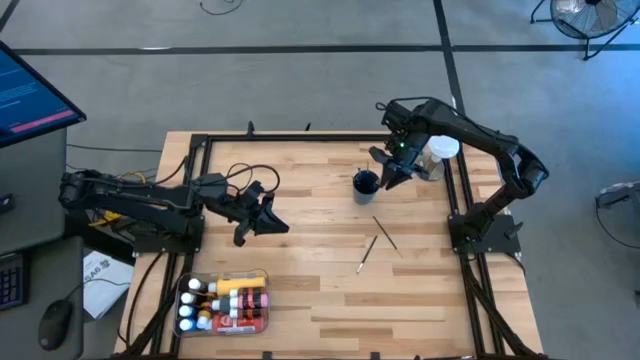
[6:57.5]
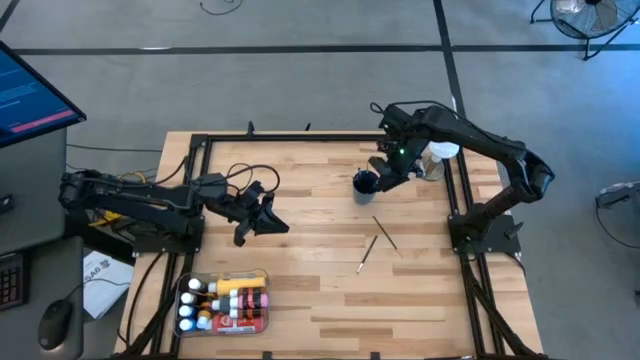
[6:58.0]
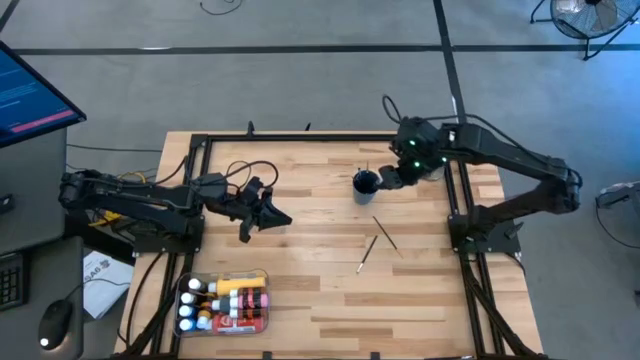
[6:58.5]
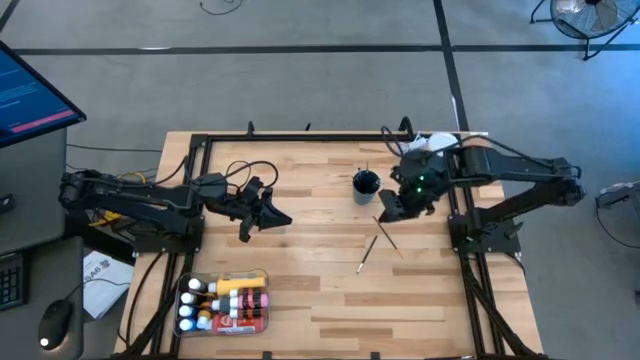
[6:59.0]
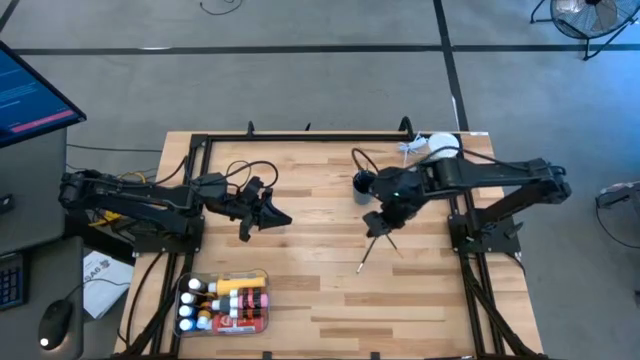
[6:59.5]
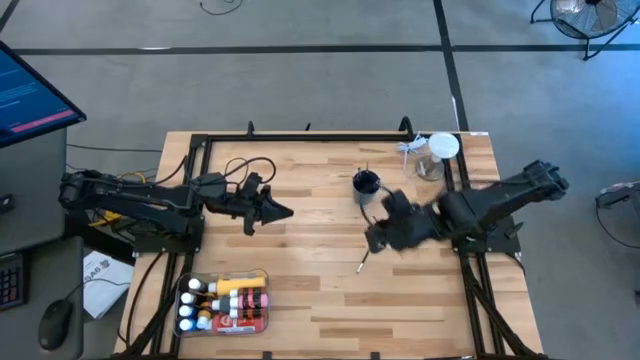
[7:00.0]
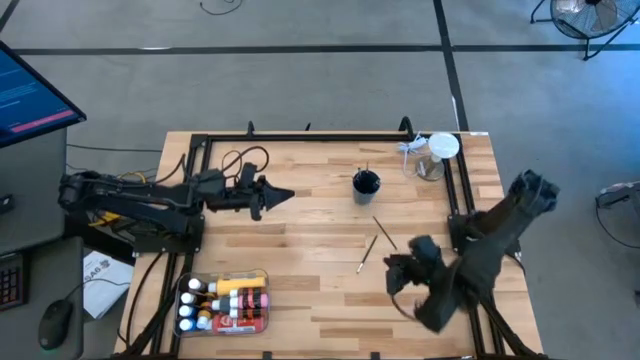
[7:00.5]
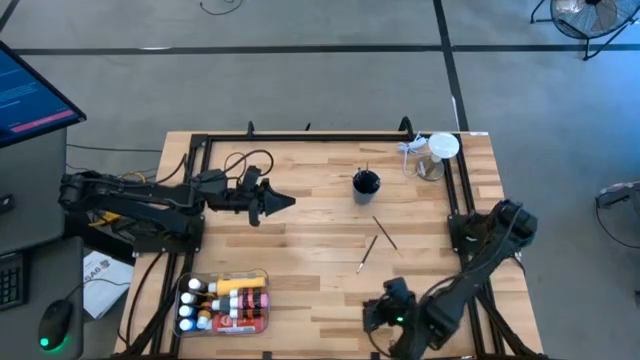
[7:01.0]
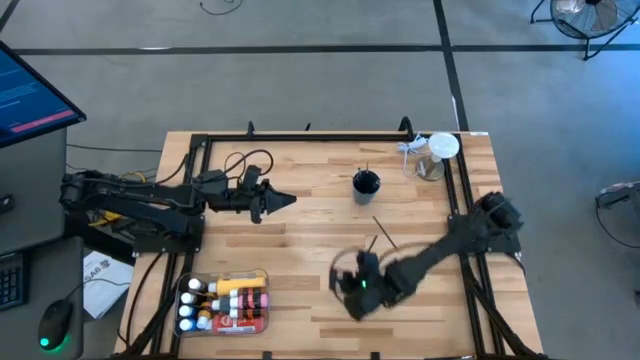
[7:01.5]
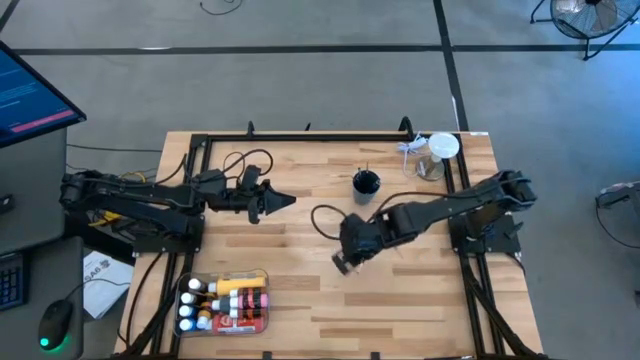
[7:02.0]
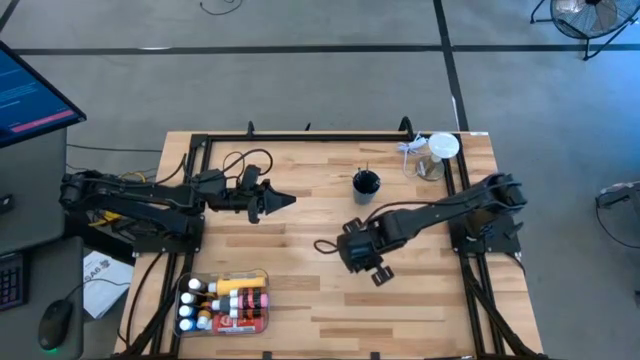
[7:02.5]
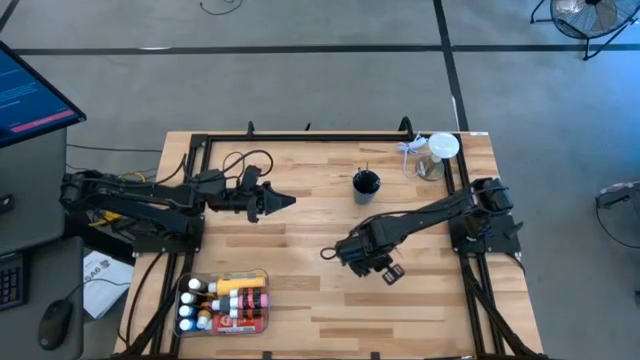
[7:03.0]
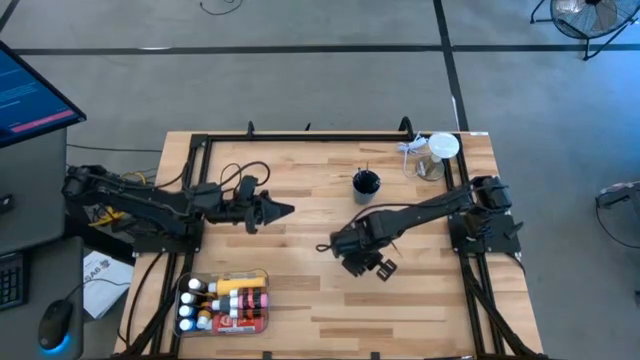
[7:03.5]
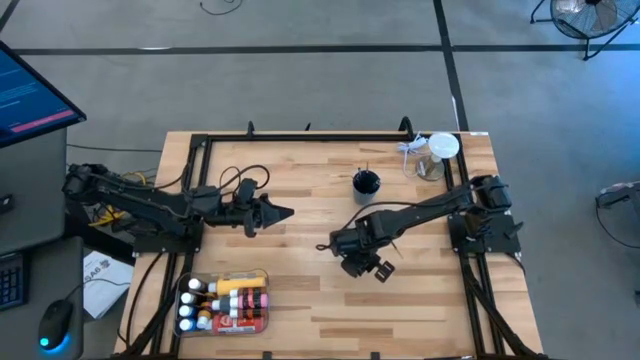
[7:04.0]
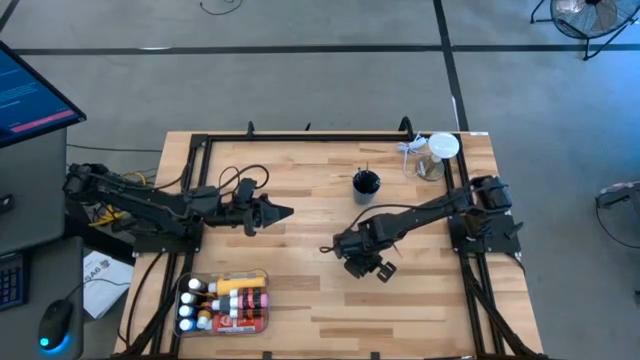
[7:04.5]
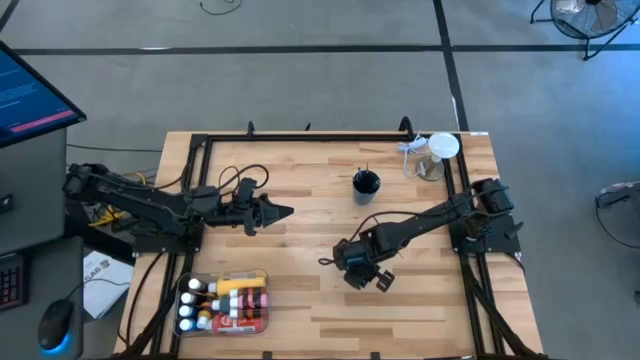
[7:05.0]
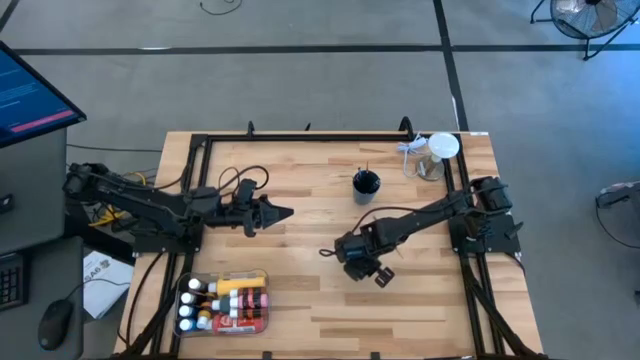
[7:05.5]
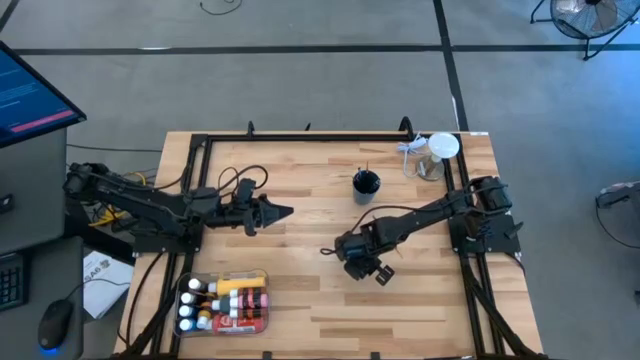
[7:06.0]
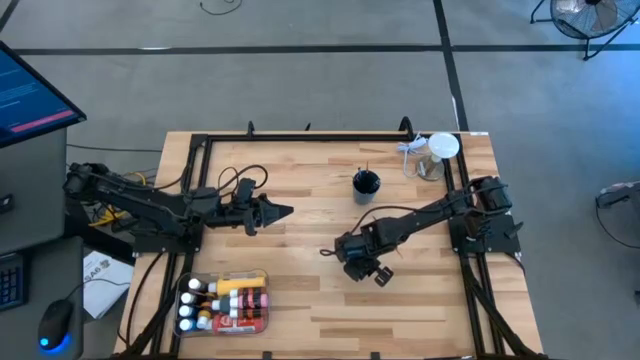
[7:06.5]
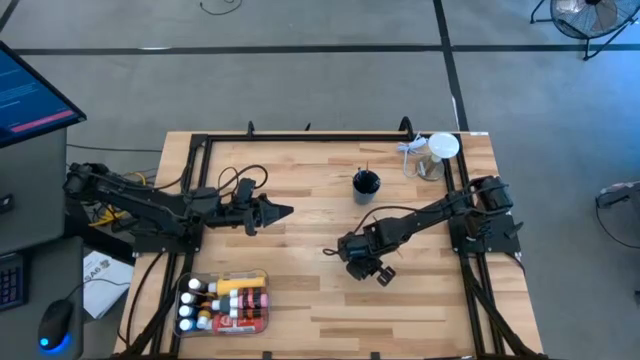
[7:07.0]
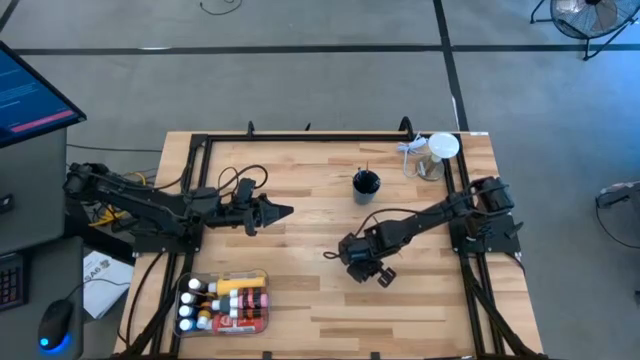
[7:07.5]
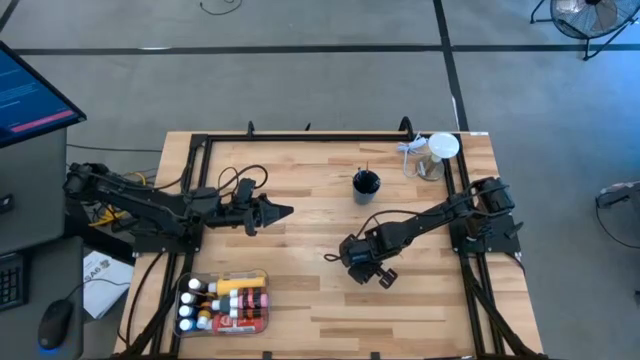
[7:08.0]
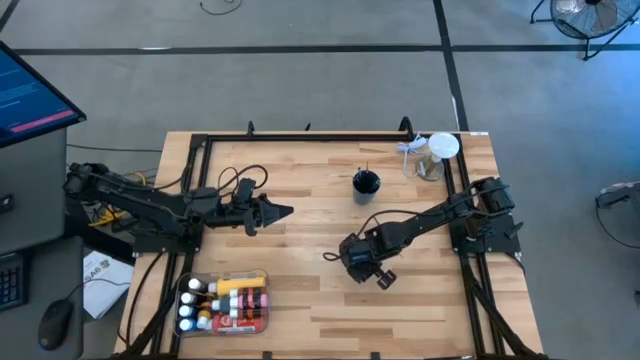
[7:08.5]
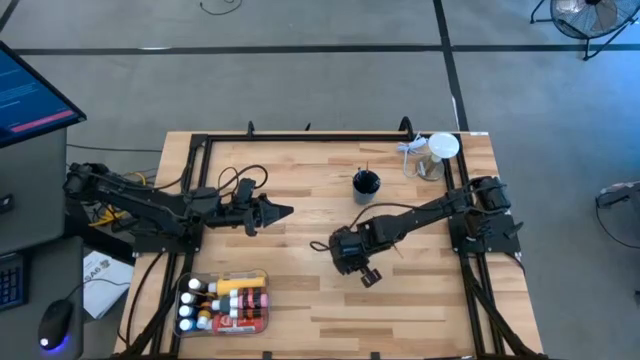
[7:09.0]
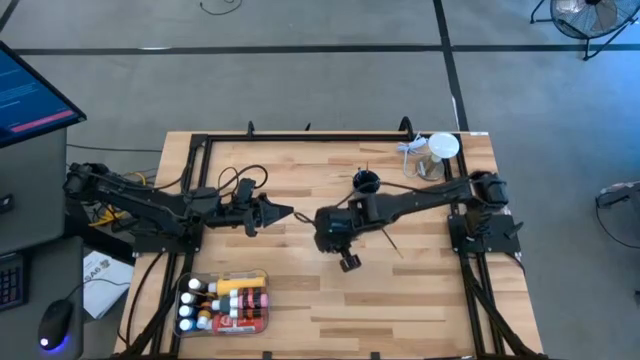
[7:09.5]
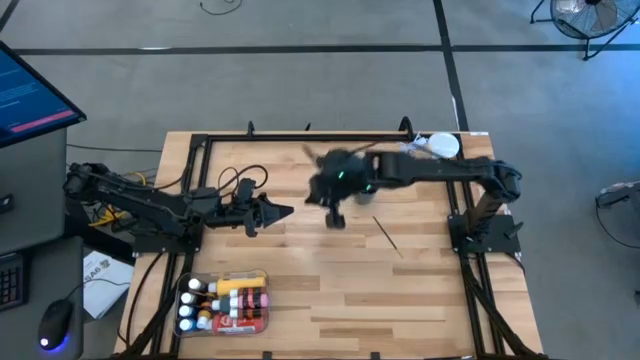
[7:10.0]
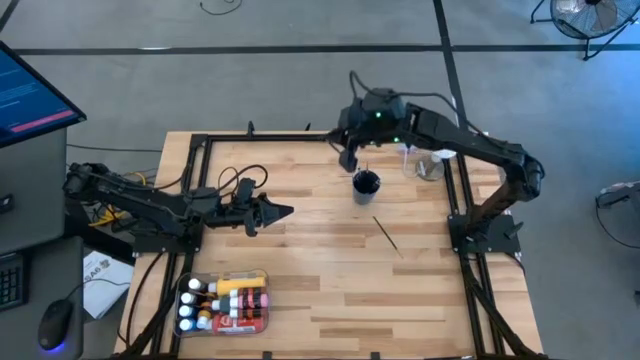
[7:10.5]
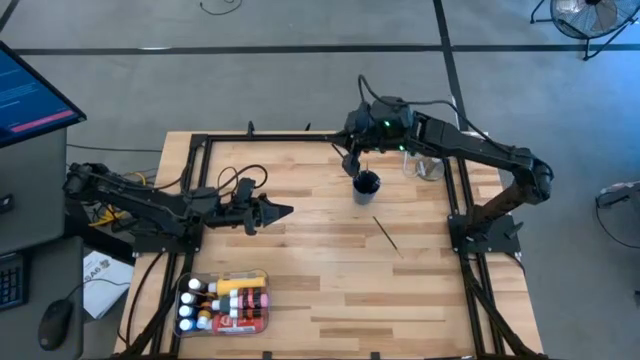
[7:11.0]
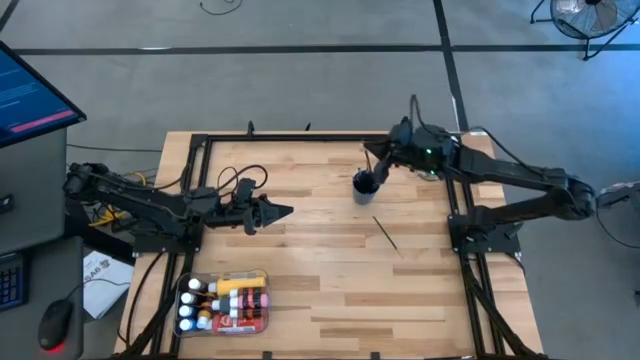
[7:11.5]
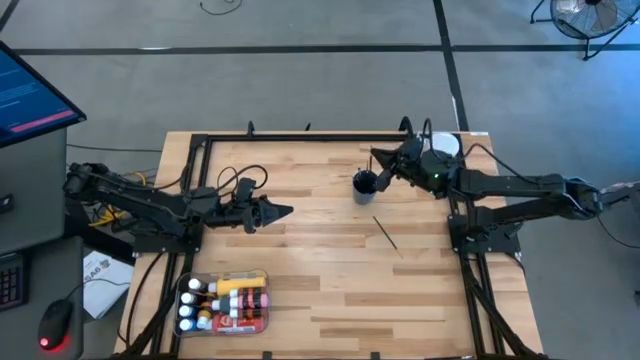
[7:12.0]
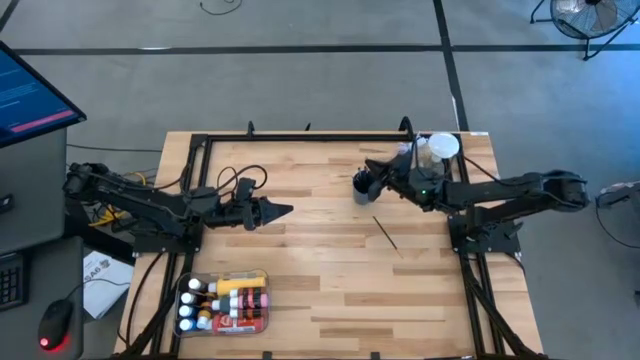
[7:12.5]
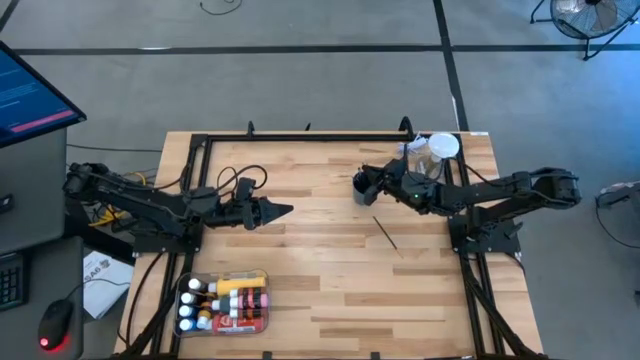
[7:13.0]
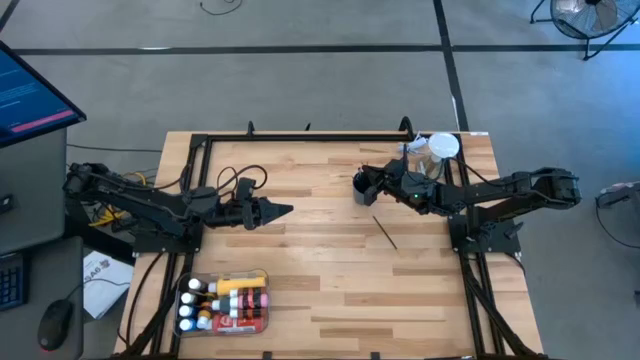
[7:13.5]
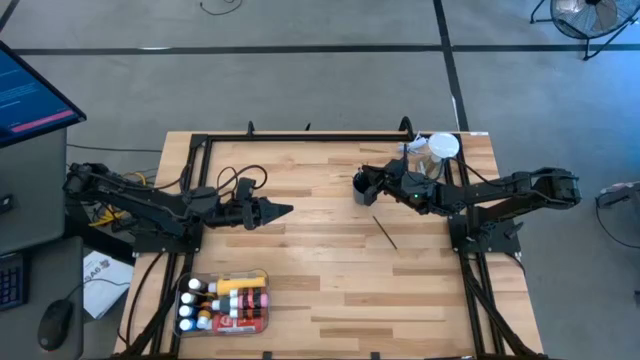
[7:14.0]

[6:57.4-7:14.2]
Task: Pick & Place Paint Supplies
Put the left paint brush into the blue cup

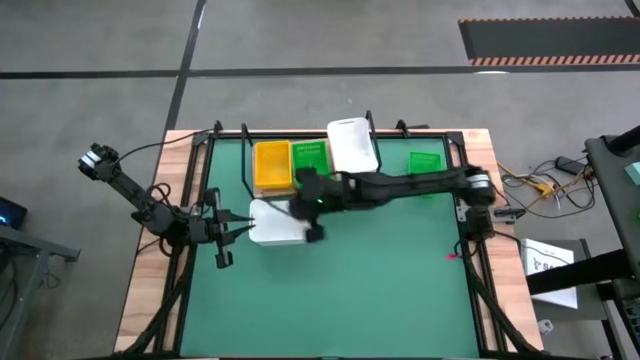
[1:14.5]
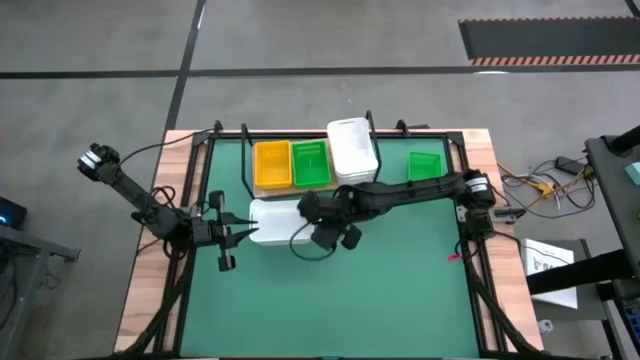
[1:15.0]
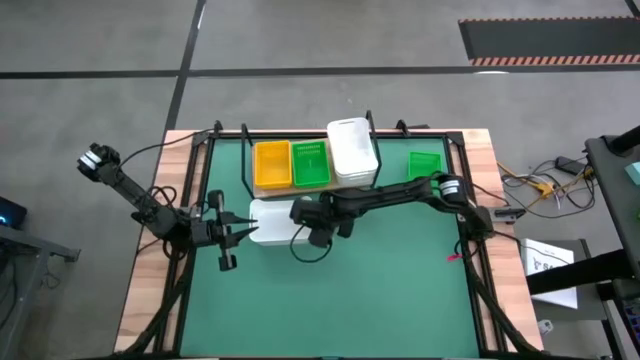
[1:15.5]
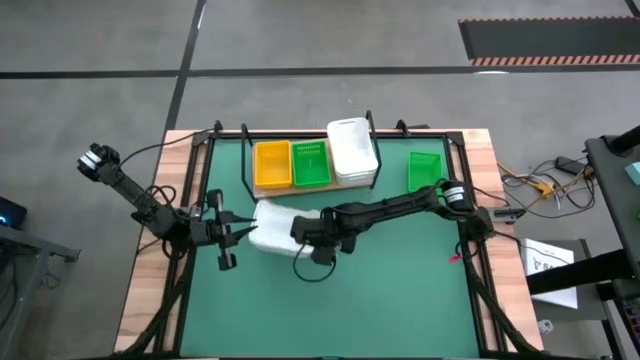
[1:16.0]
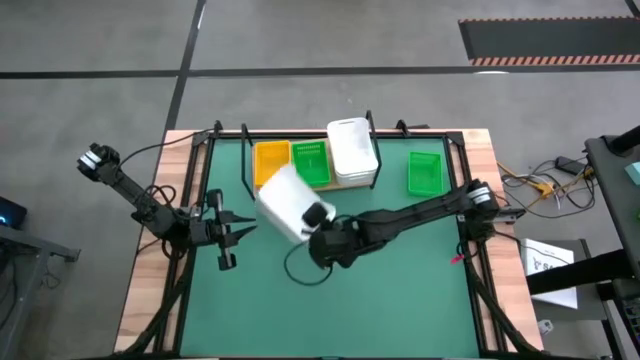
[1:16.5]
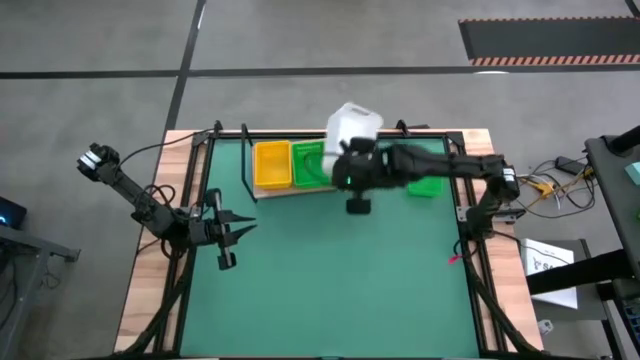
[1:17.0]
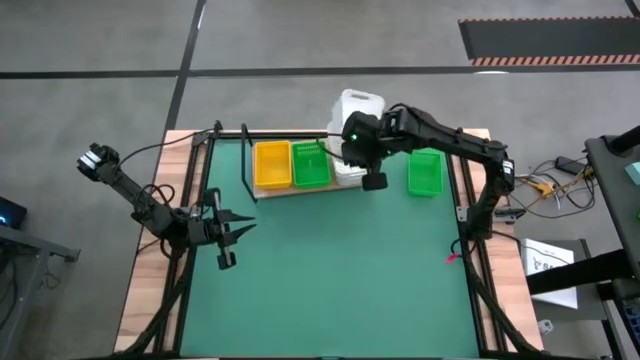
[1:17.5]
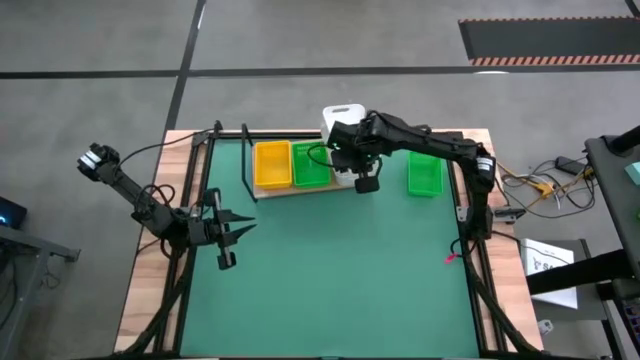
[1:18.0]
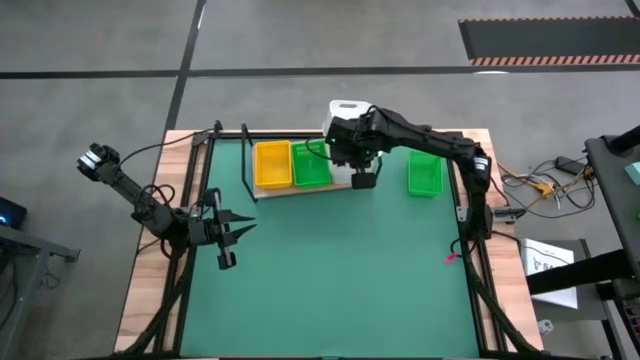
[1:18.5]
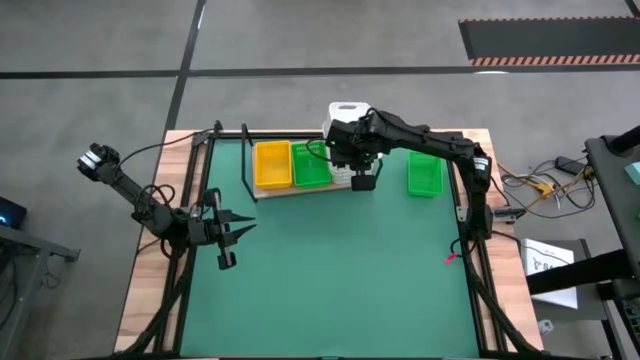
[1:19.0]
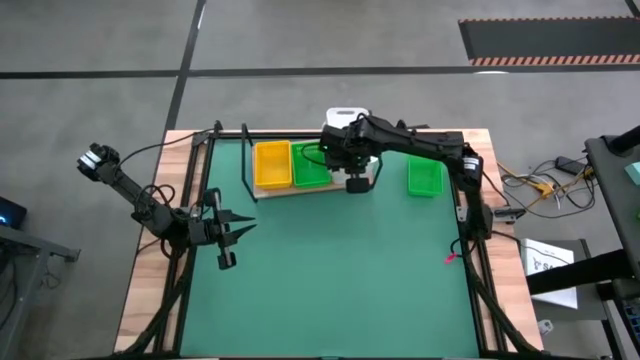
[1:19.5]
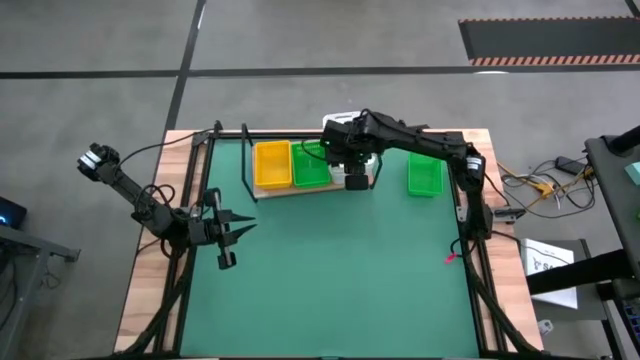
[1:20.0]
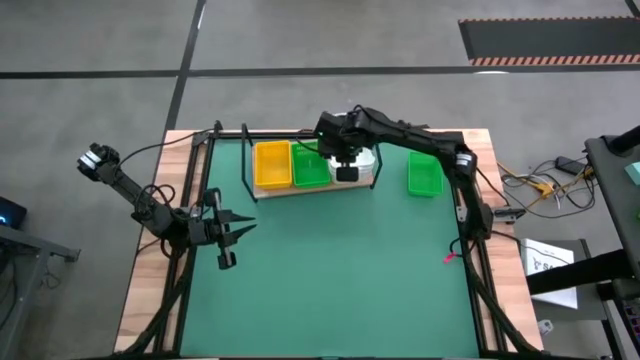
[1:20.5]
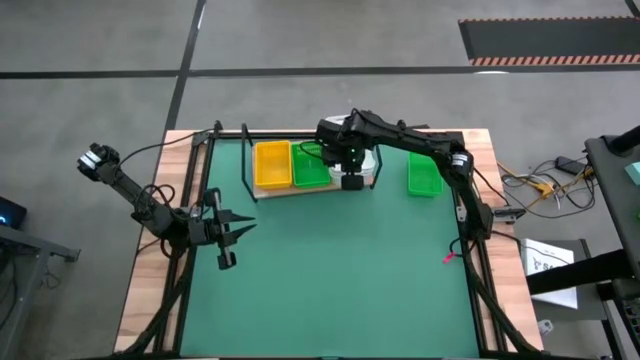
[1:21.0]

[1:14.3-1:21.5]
Task: Stack baskets on shelf by color
Stack the white bin on the white bin on the shelf
